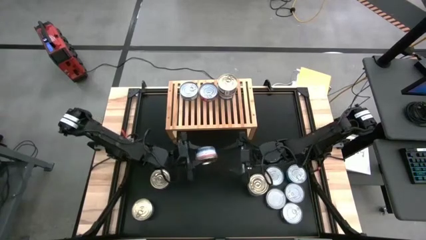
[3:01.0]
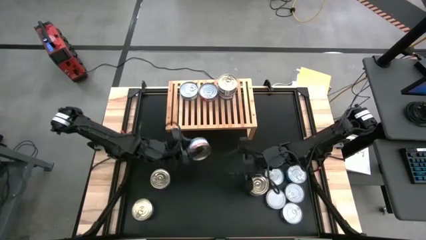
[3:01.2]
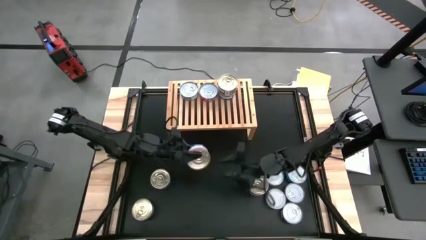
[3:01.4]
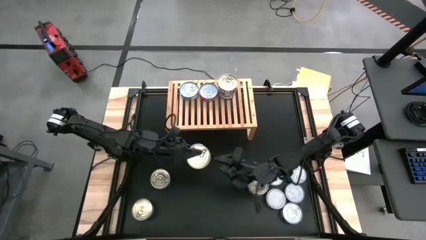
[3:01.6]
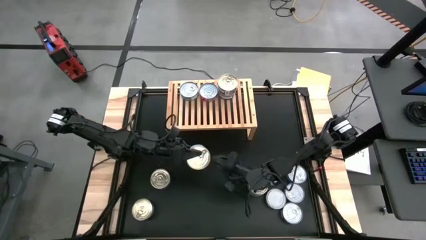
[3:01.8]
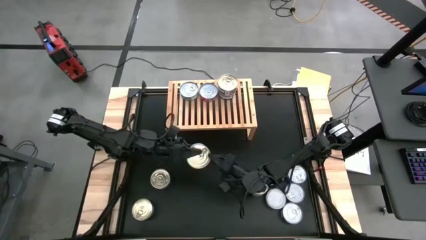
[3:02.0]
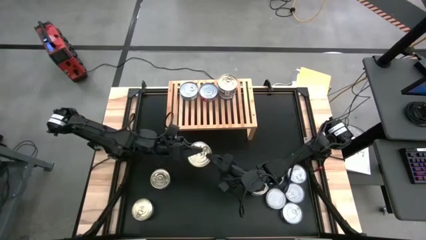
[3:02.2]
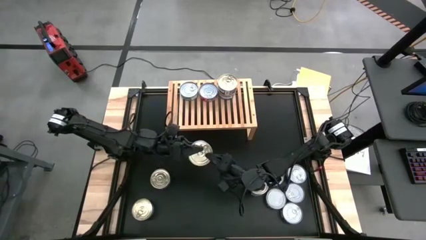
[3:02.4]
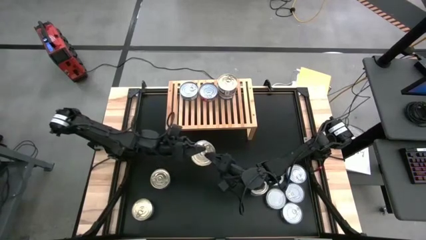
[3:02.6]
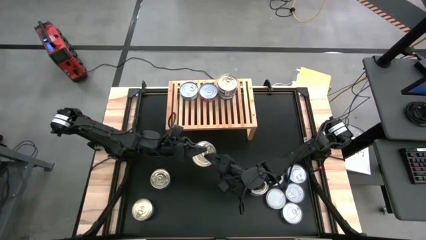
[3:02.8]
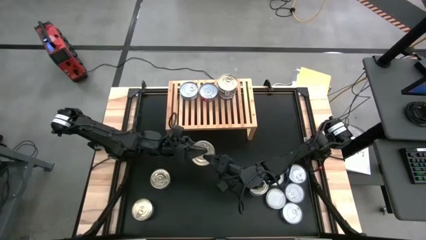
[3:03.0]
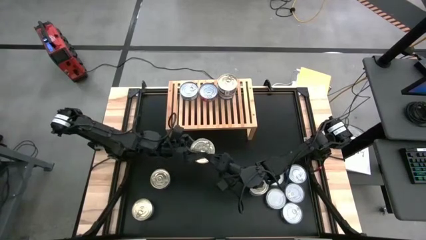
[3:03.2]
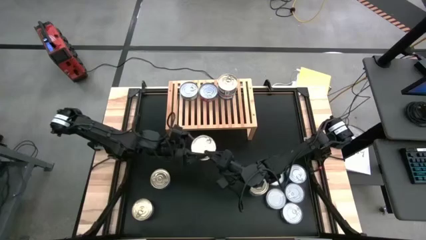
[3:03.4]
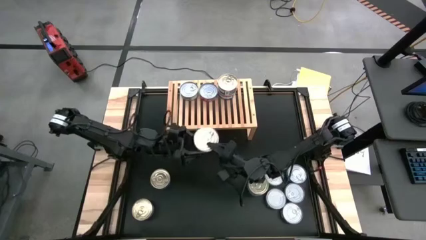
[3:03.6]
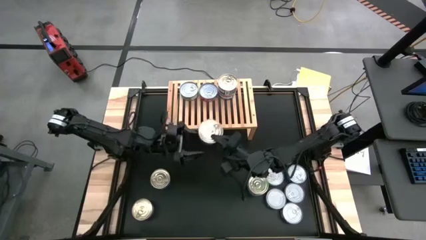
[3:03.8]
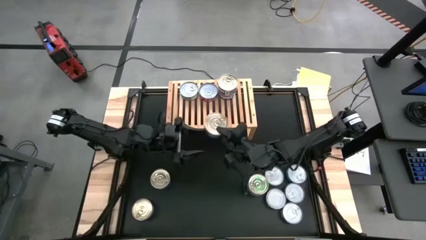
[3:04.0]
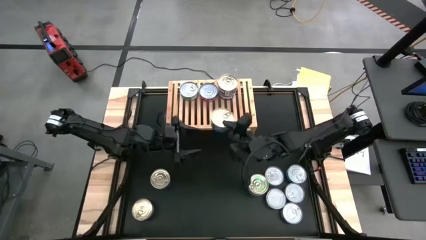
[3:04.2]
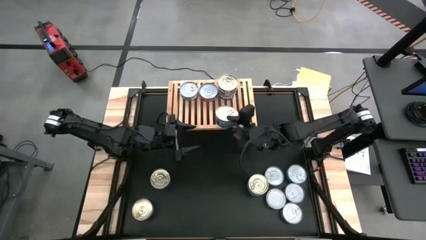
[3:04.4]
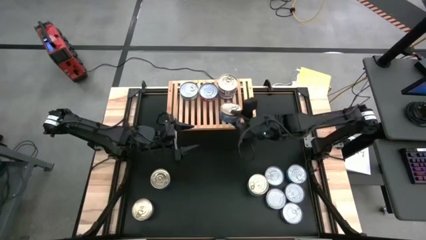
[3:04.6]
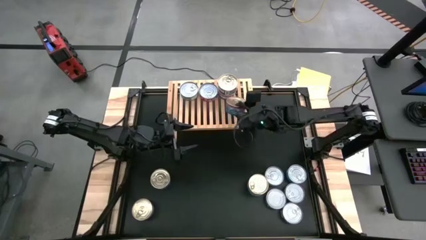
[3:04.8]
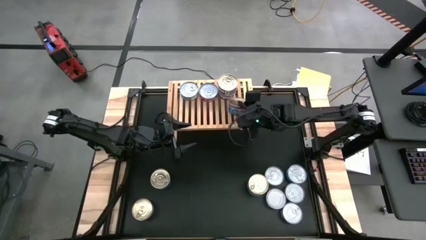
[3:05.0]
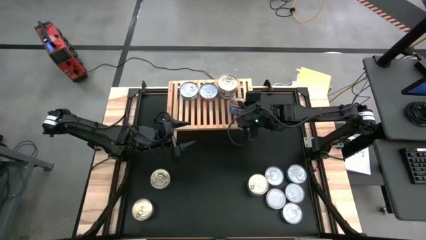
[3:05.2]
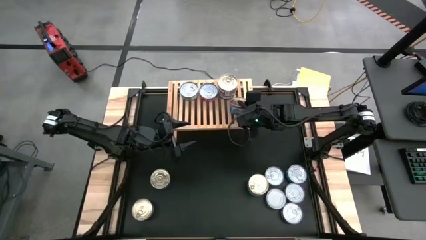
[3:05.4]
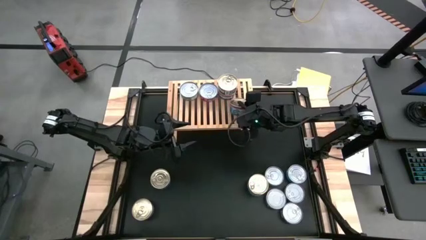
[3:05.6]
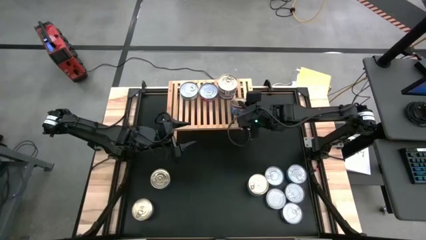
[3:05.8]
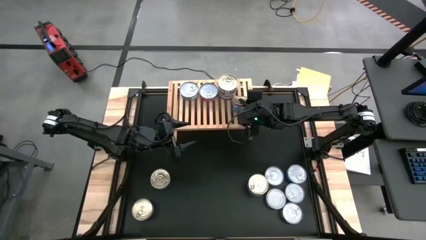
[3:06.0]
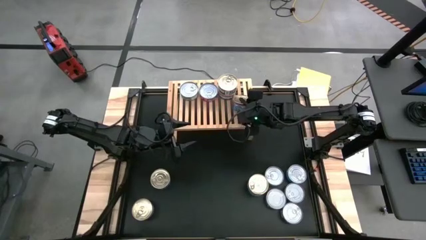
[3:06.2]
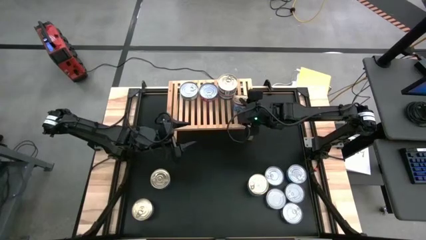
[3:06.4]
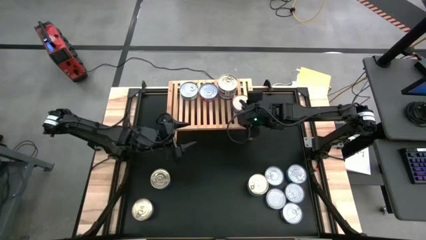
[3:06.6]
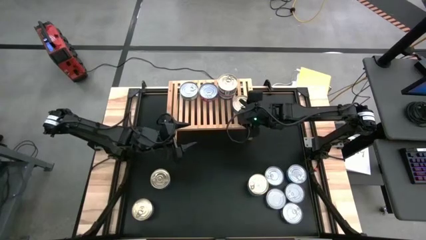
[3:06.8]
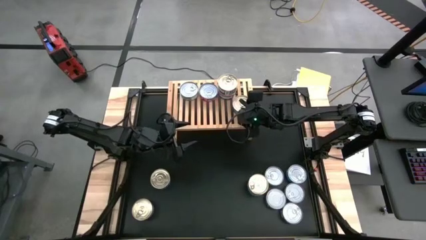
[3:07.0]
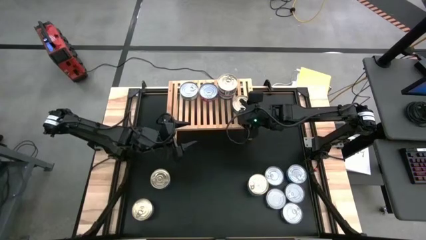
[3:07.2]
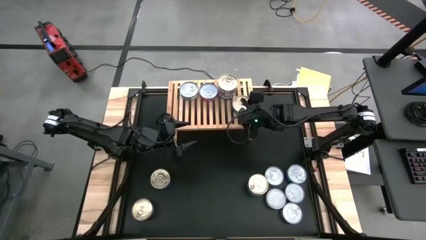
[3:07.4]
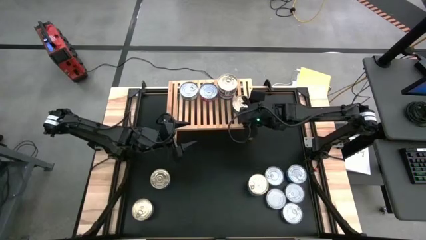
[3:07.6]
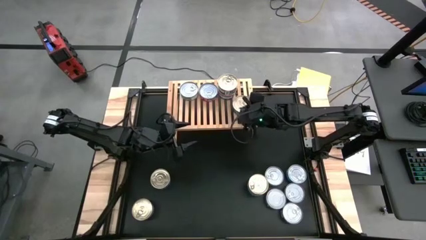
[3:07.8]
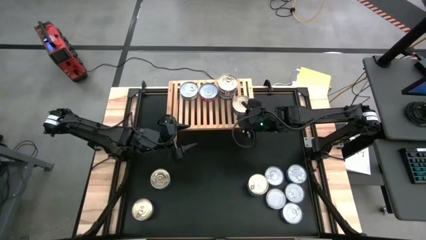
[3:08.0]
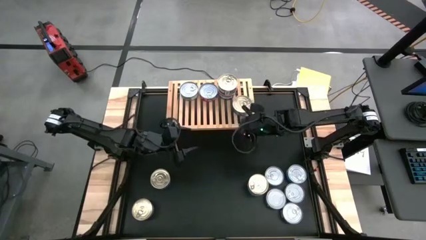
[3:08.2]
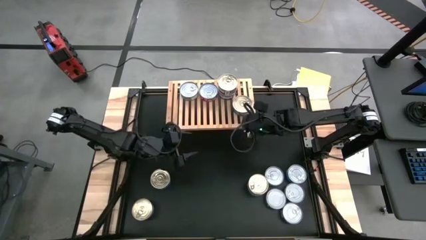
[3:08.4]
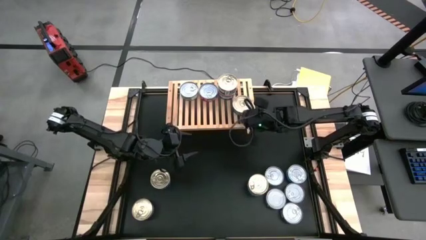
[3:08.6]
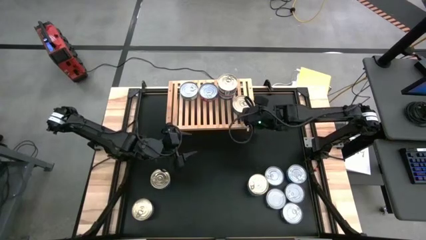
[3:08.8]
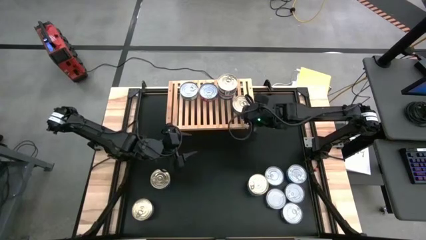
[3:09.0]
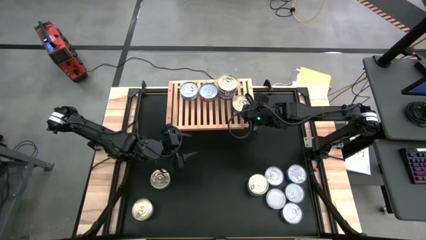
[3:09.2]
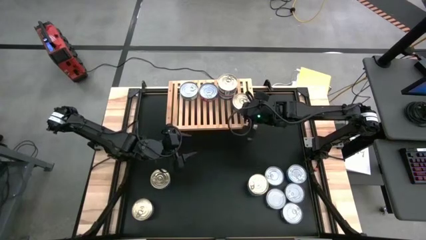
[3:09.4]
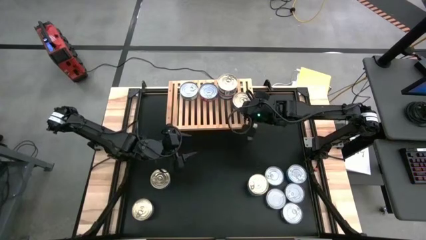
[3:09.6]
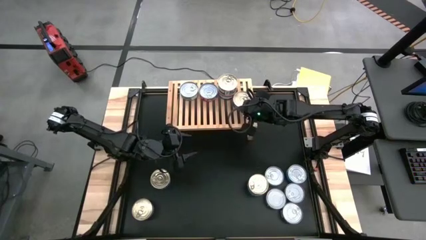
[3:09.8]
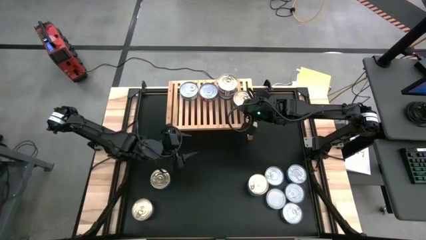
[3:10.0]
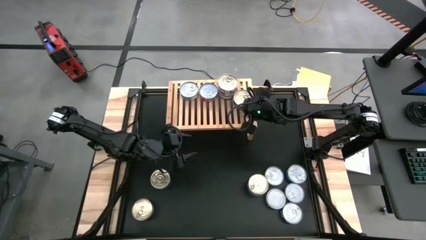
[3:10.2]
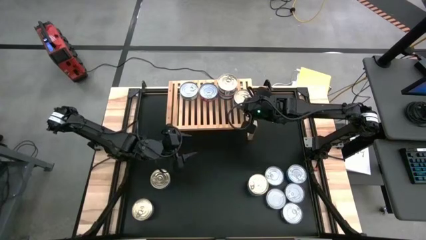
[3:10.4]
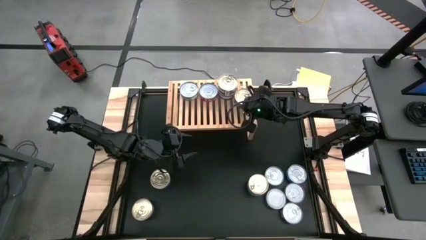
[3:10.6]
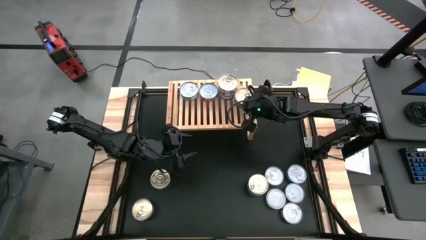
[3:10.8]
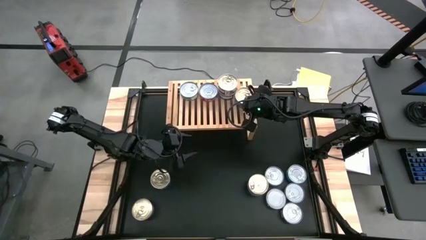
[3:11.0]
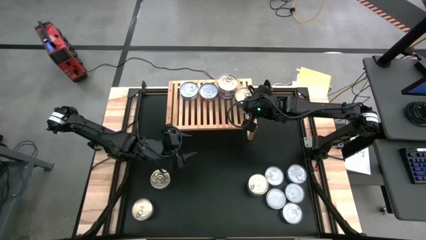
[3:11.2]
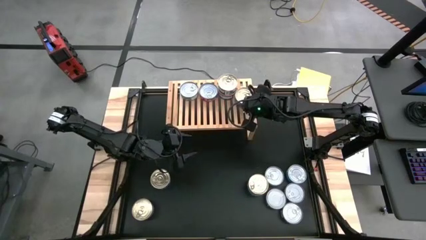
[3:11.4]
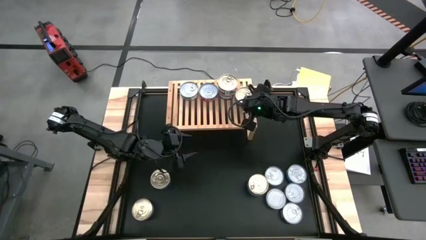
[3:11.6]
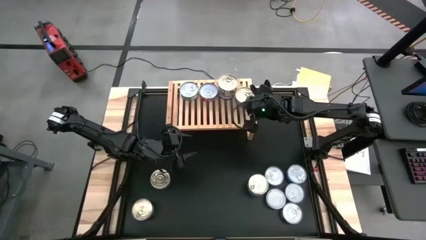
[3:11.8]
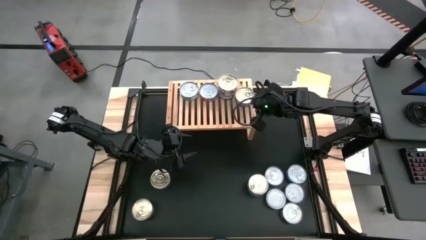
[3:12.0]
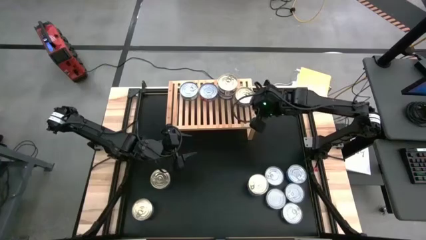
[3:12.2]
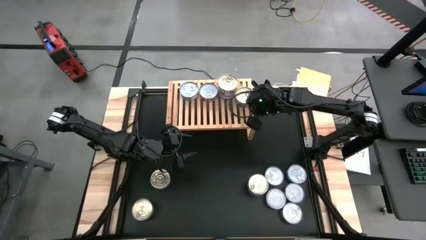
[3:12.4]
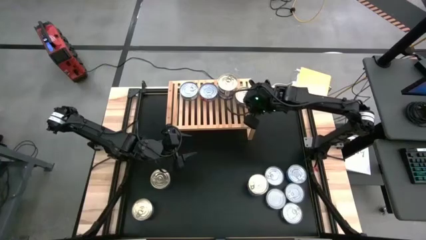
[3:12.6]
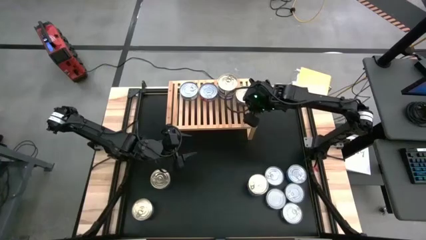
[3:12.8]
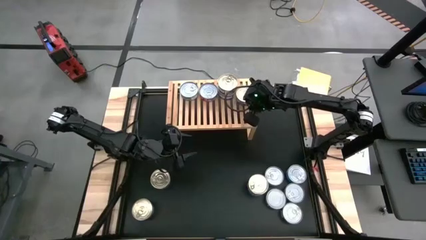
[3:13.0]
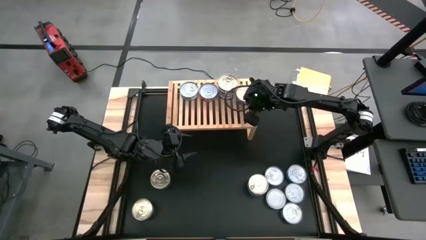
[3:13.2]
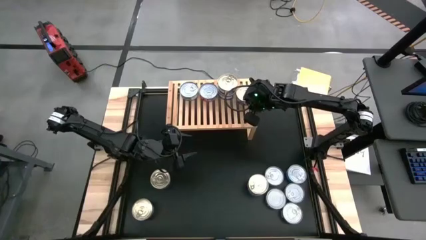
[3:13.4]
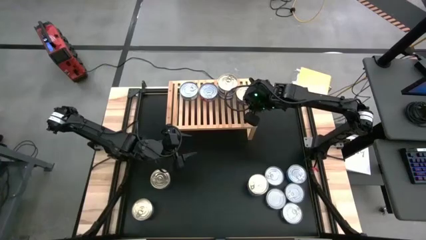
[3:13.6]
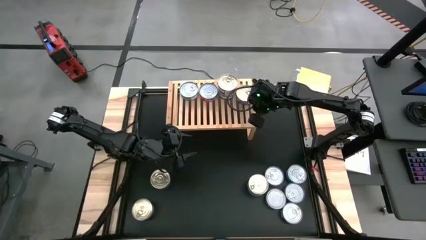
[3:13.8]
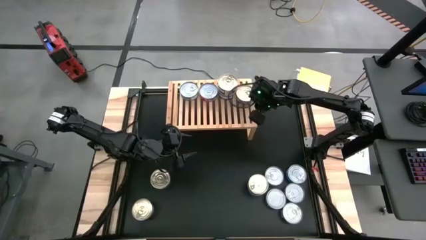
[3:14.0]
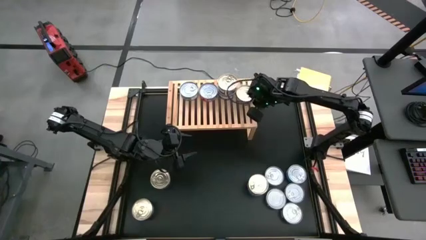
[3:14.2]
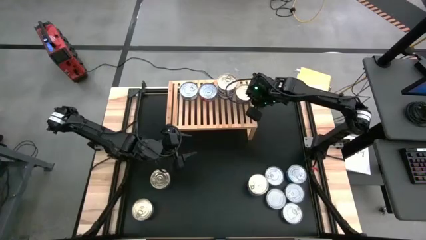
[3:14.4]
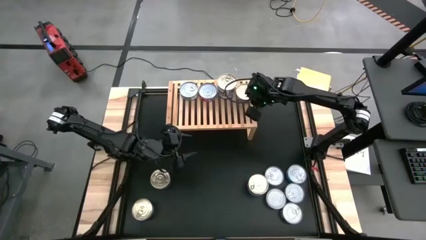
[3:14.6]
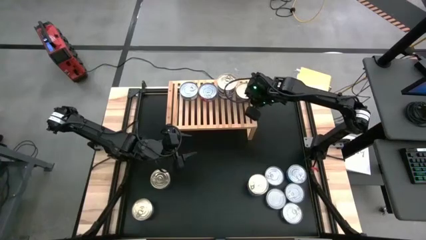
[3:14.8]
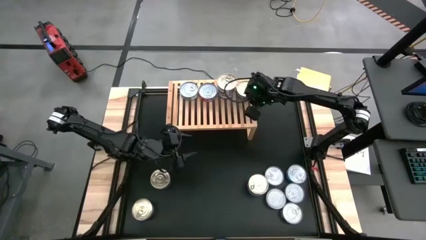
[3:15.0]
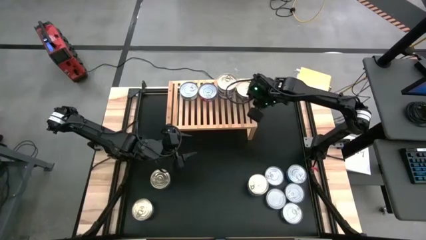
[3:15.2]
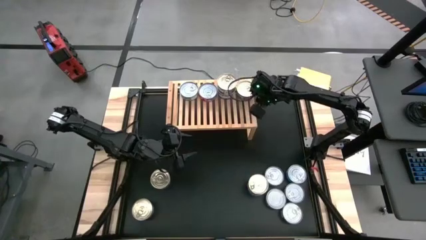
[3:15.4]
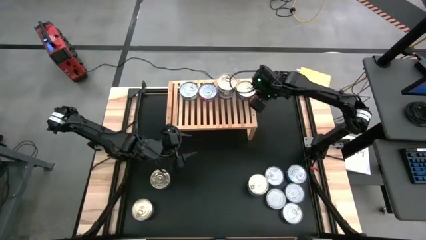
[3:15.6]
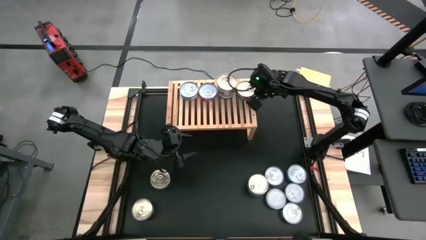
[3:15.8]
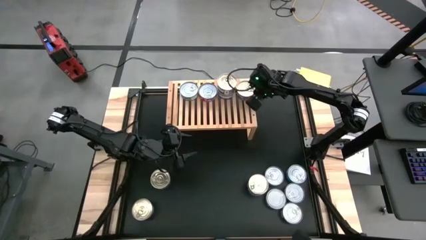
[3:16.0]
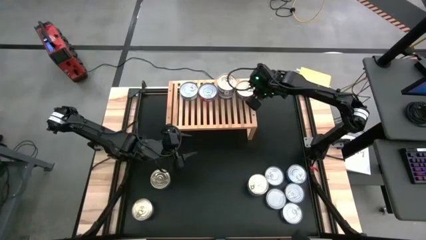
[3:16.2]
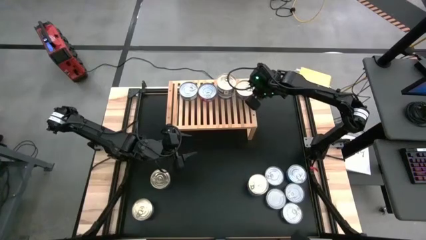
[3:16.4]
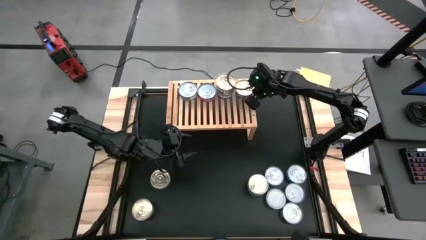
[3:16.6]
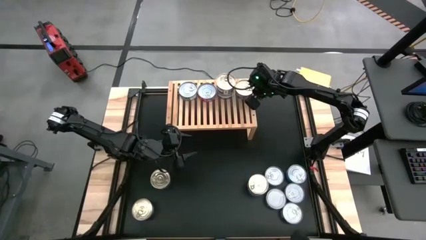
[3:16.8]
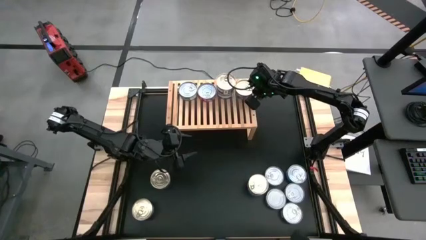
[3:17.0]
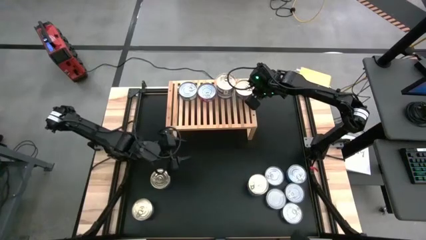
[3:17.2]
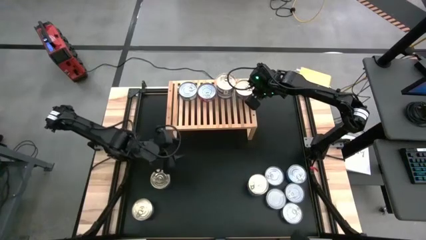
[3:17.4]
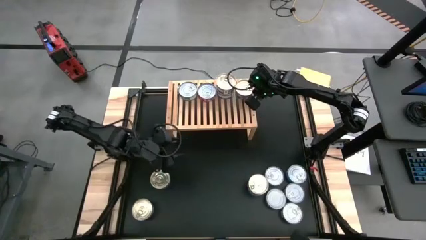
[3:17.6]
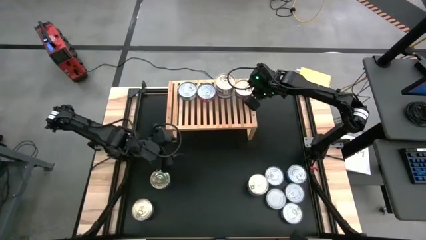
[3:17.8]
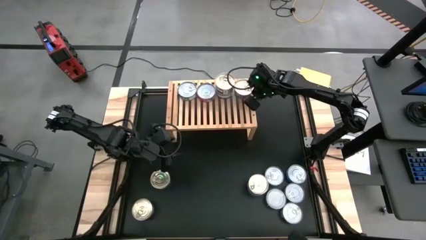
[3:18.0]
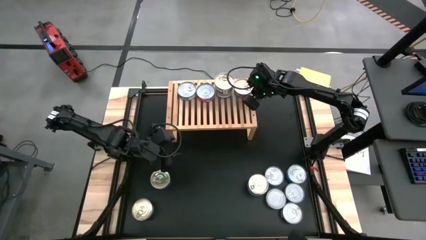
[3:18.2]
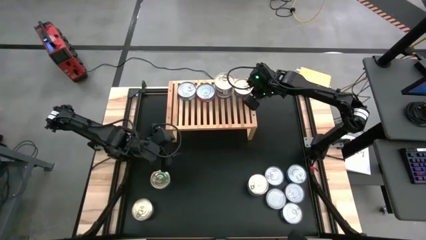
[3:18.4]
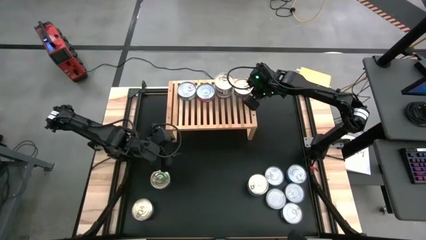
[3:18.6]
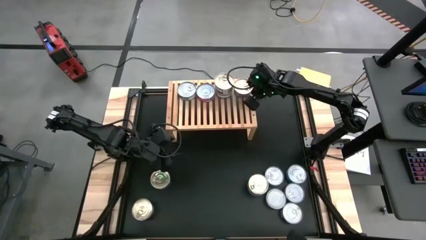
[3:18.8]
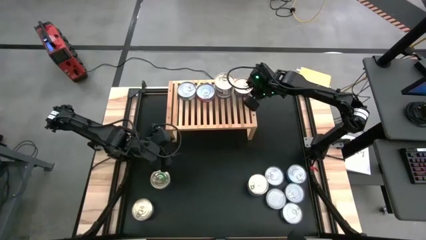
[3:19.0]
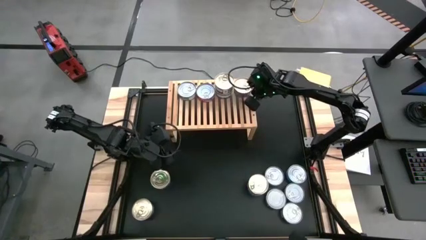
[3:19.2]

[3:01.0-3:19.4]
Task: Stack canned seafood by type on shelf
Put the blue and pink tuna can on the shelf
